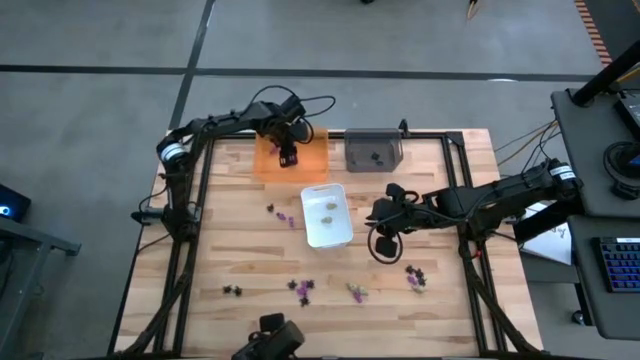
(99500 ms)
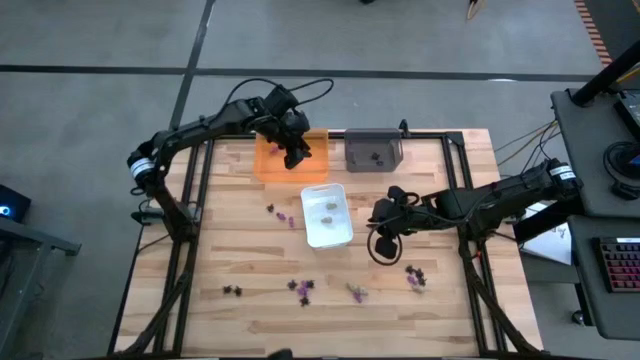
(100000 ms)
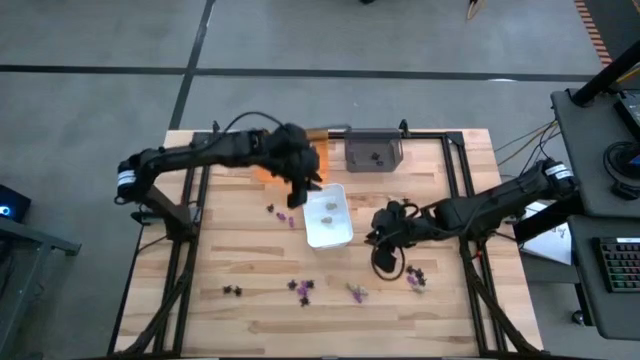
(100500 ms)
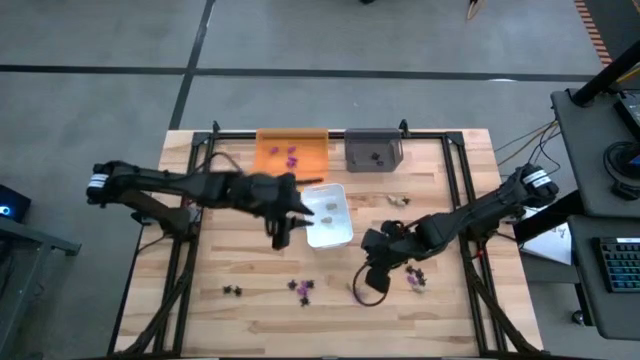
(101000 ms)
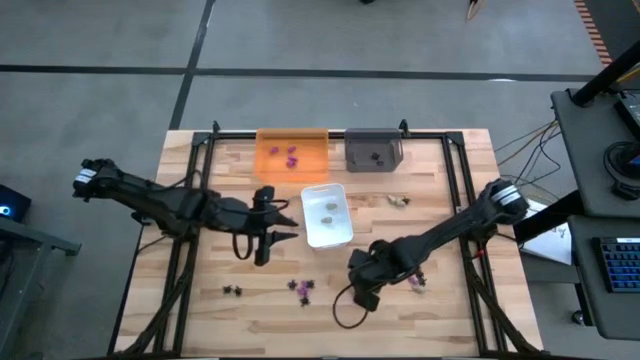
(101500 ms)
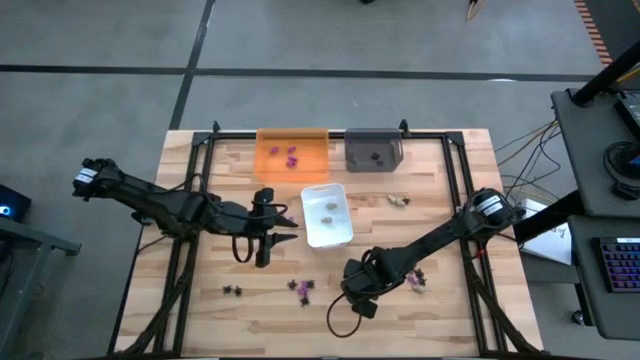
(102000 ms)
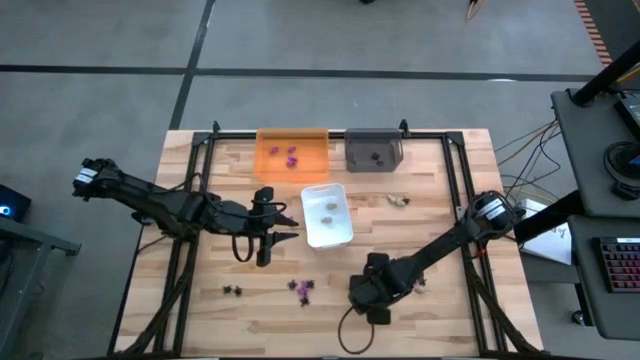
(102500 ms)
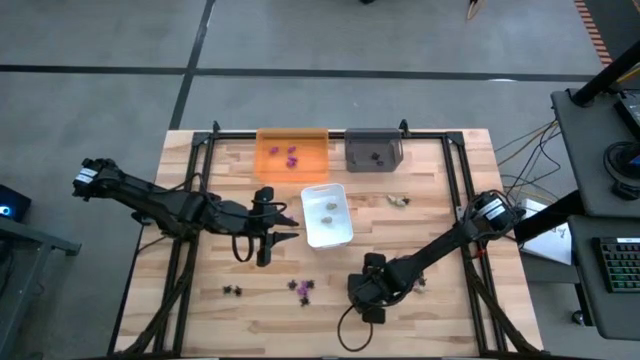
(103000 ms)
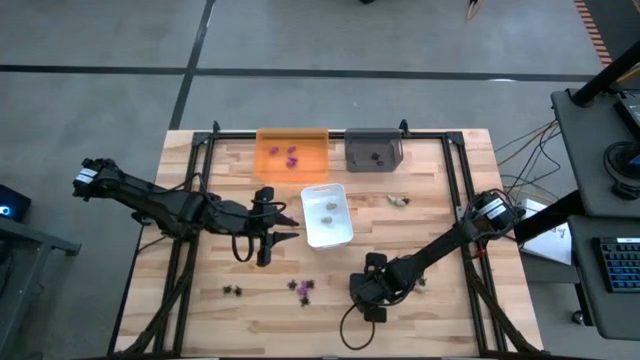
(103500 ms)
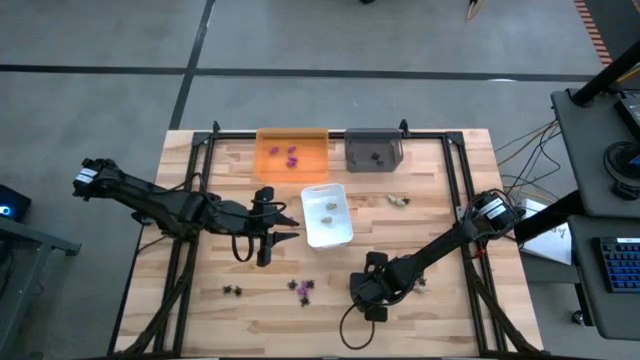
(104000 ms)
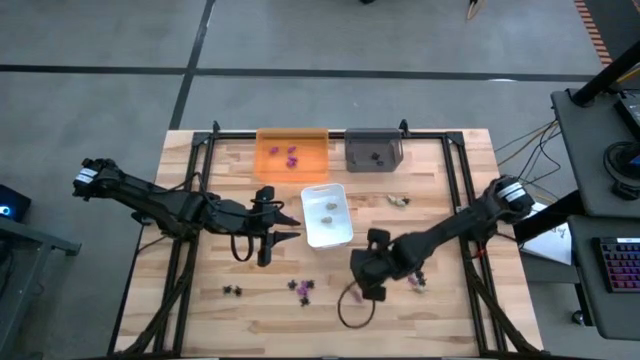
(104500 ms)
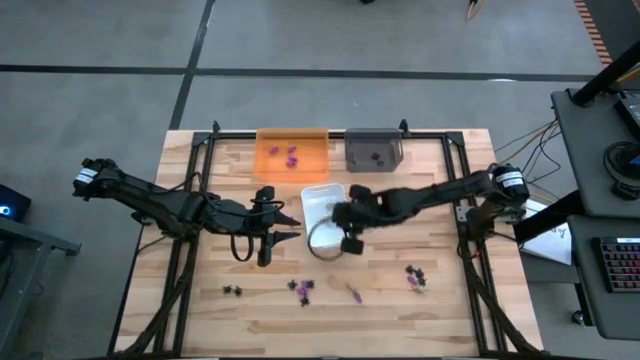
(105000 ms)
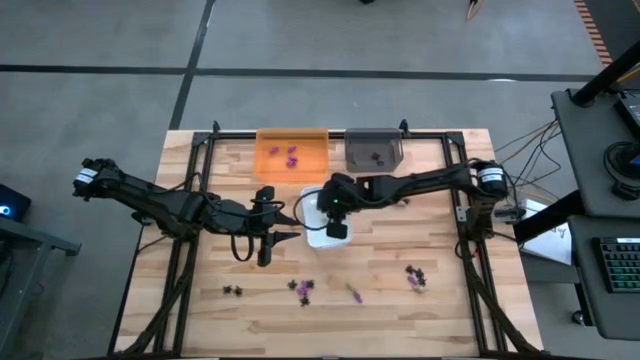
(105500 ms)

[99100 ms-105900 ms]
Task: Sort Halloween decoration
Put the white skull toy into the white bin

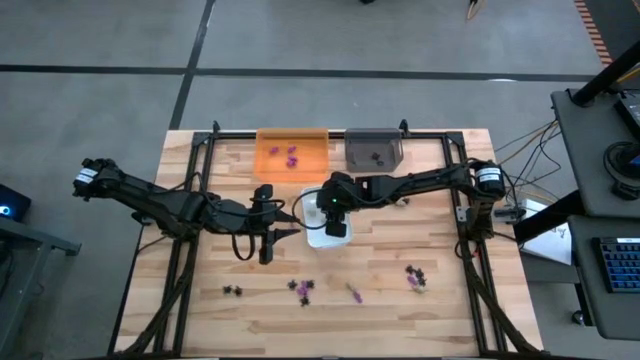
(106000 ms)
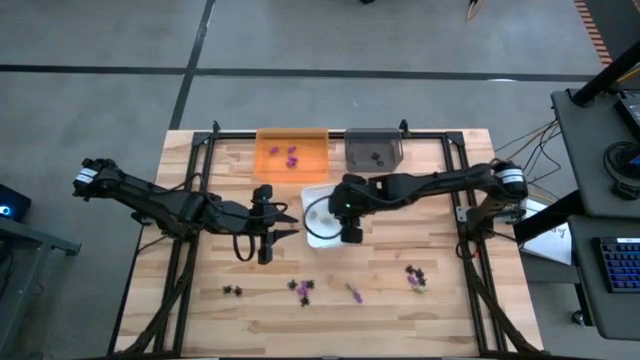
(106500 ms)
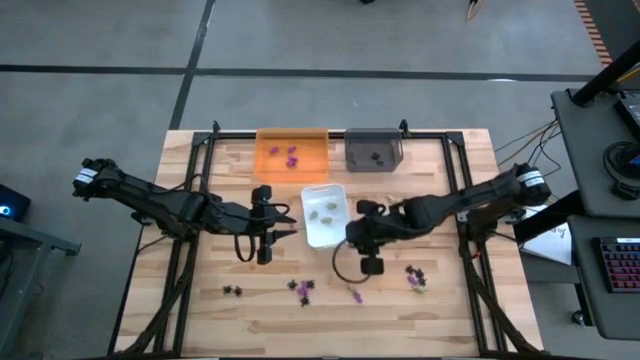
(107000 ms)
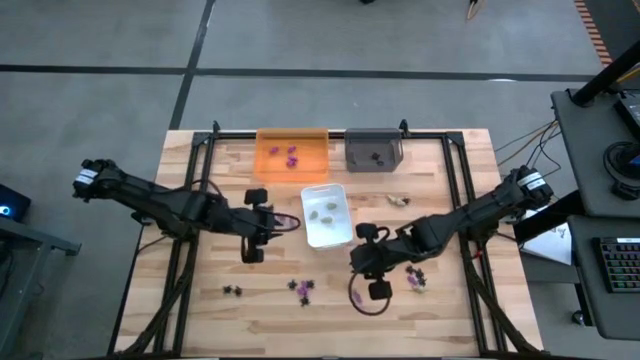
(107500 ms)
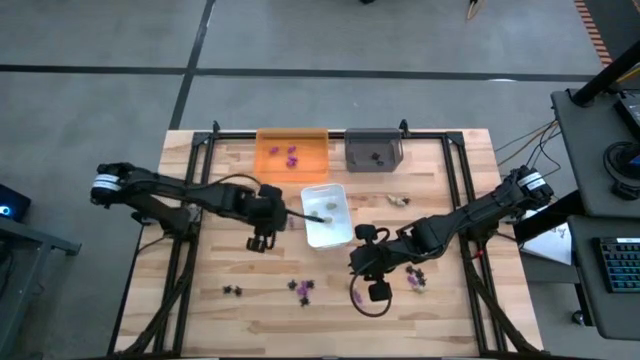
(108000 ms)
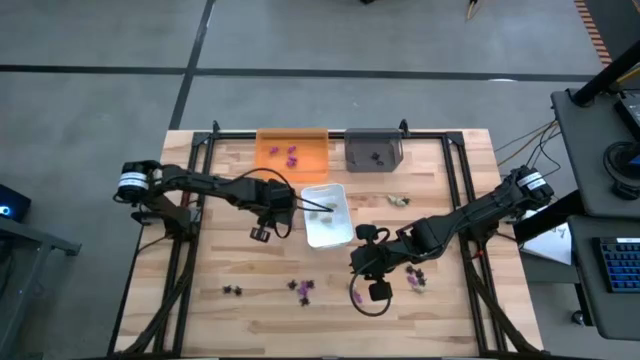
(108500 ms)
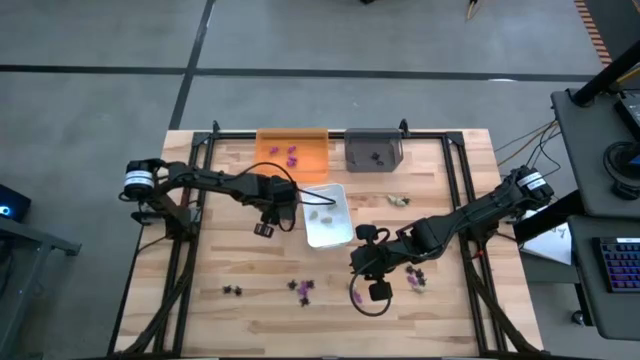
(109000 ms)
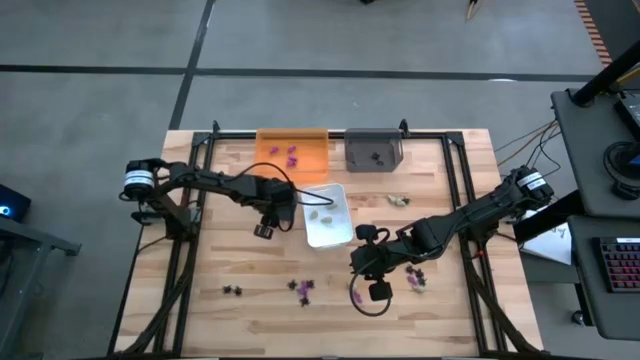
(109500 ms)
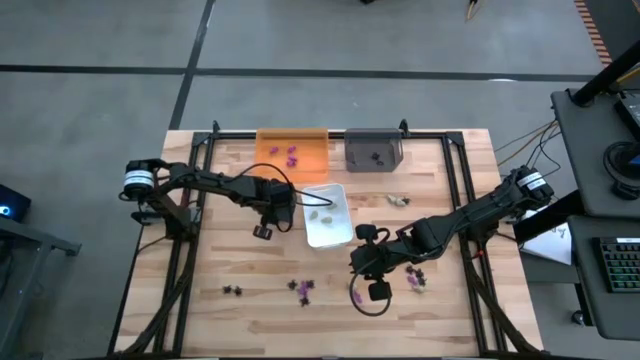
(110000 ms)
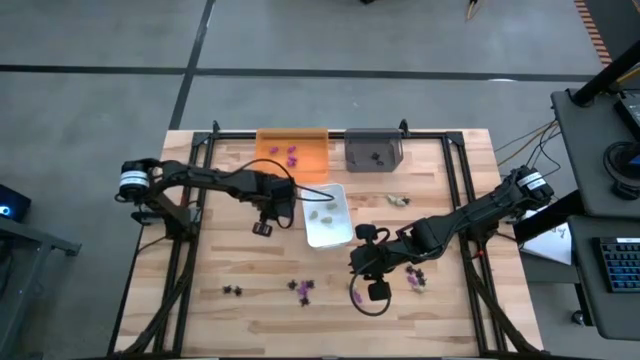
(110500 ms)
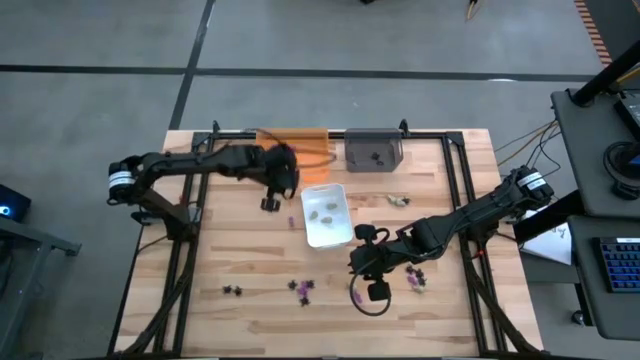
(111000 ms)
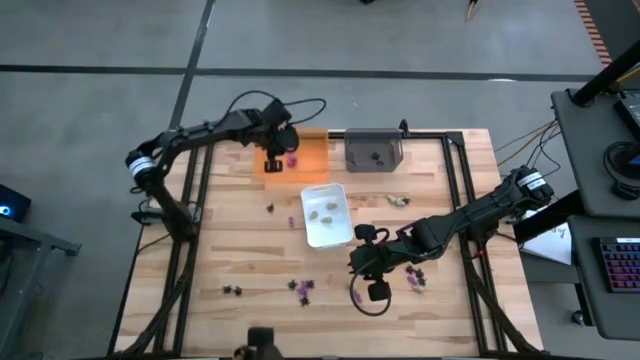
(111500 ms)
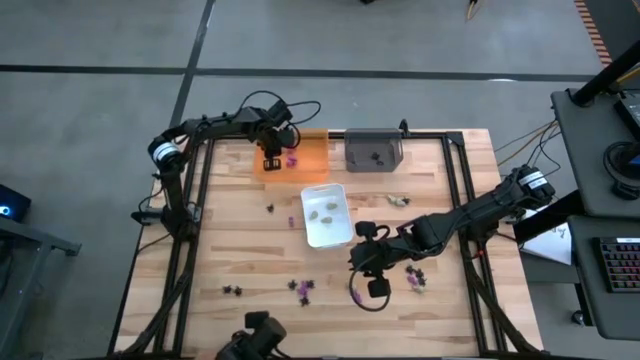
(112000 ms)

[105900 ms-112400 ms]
Put the purple skeleton toy into the orange bin

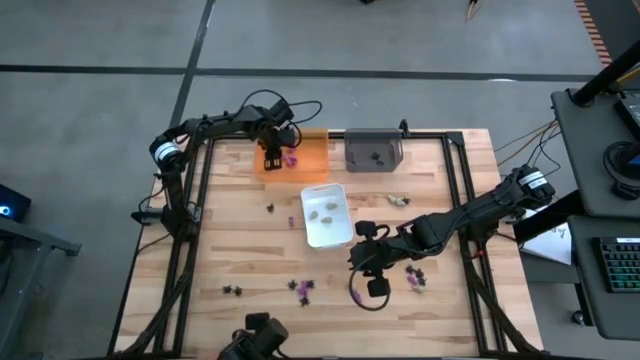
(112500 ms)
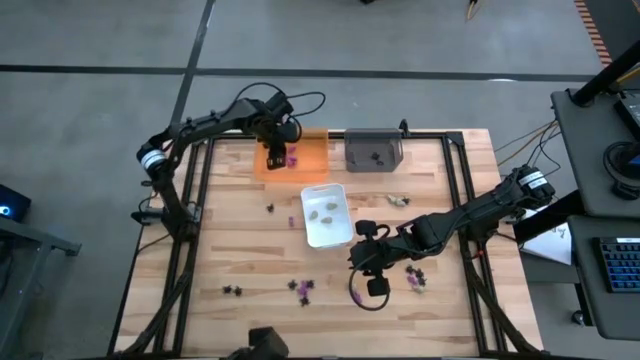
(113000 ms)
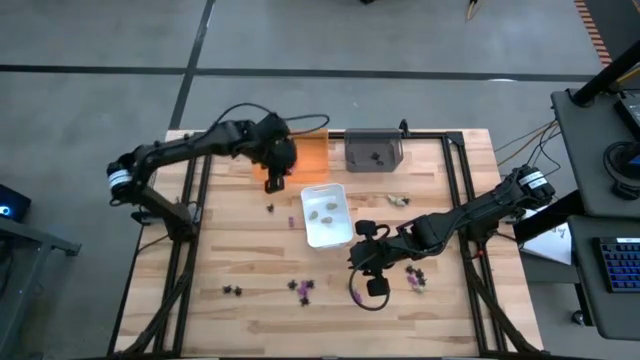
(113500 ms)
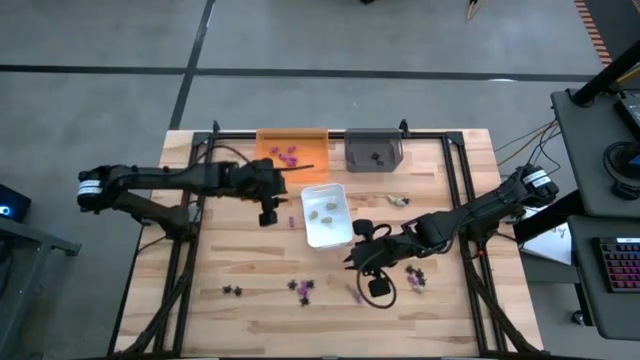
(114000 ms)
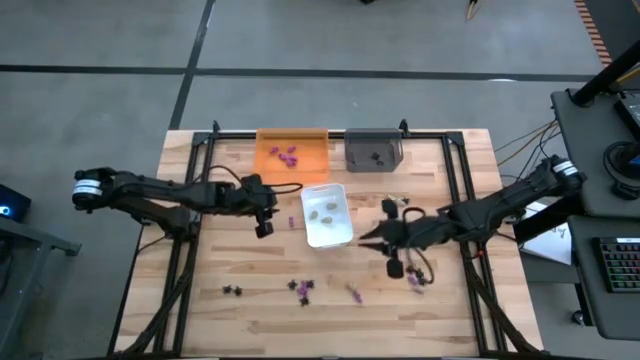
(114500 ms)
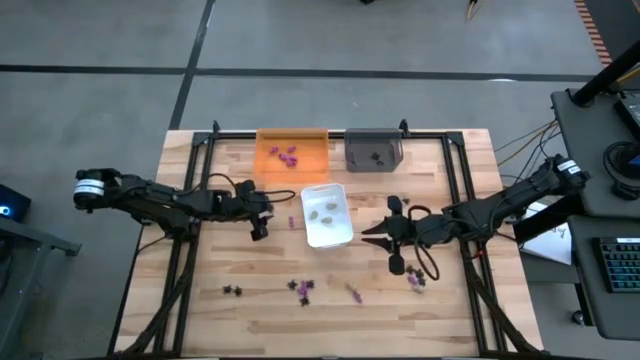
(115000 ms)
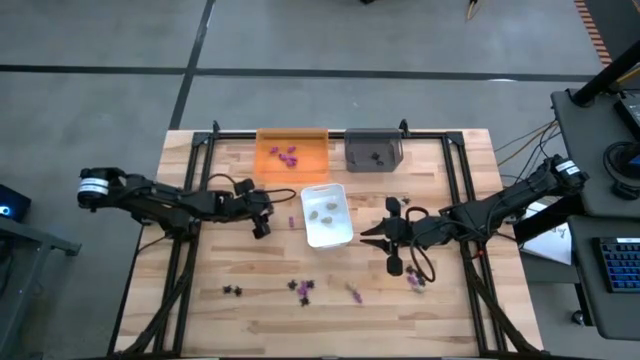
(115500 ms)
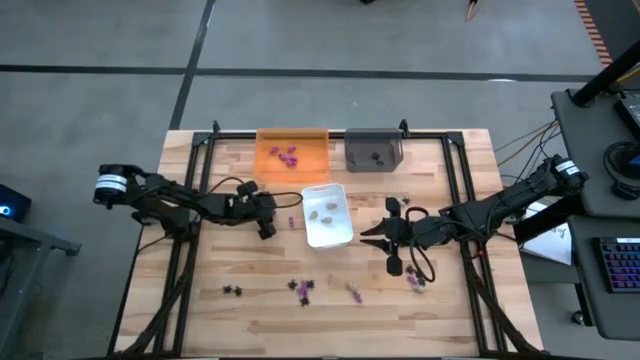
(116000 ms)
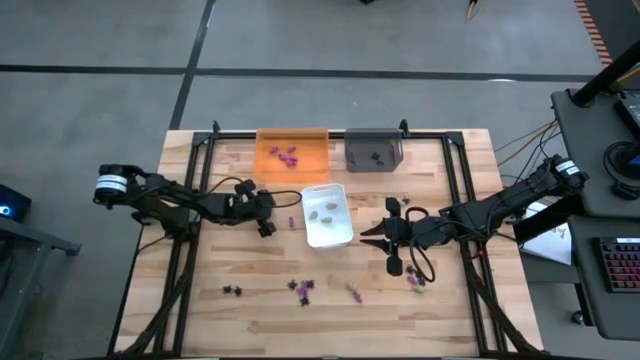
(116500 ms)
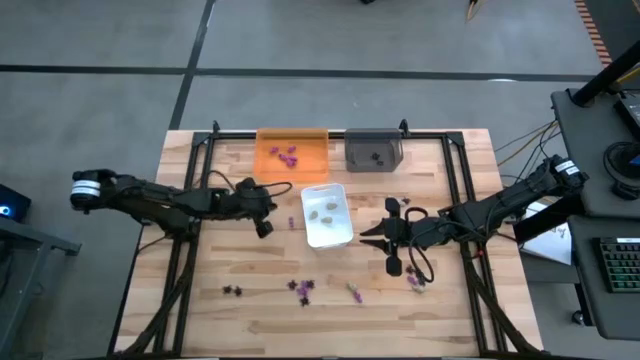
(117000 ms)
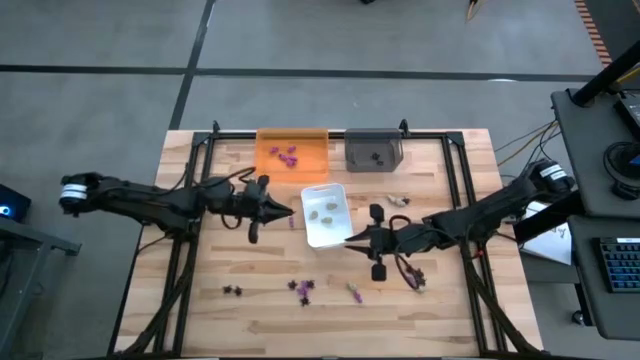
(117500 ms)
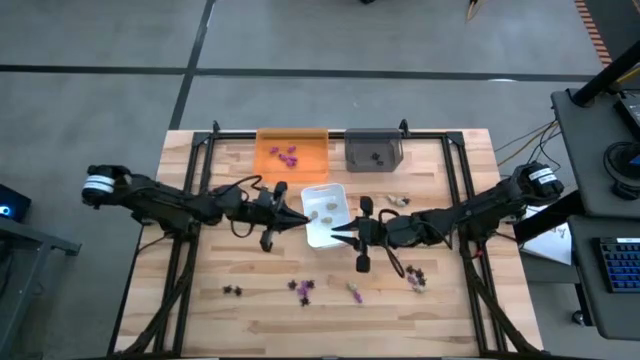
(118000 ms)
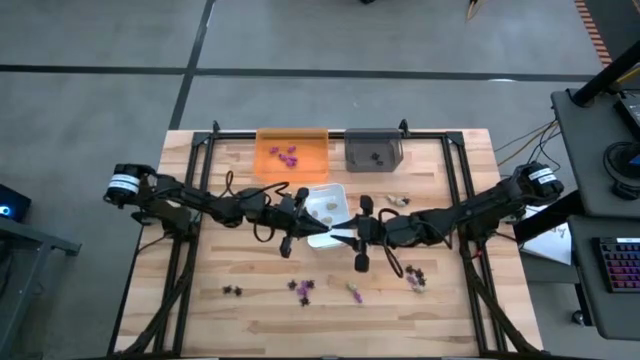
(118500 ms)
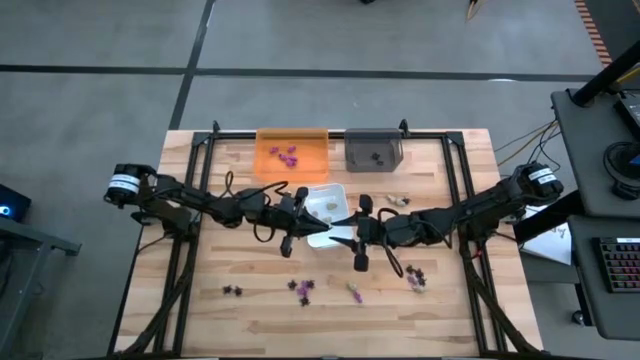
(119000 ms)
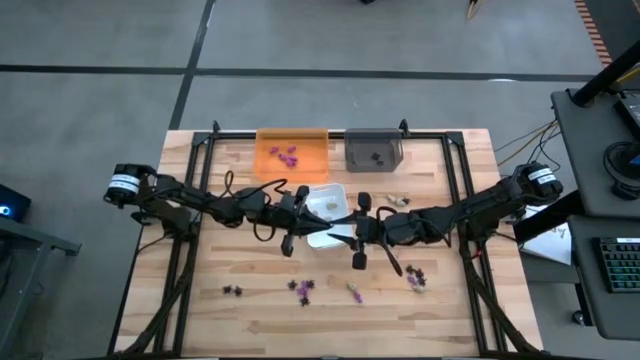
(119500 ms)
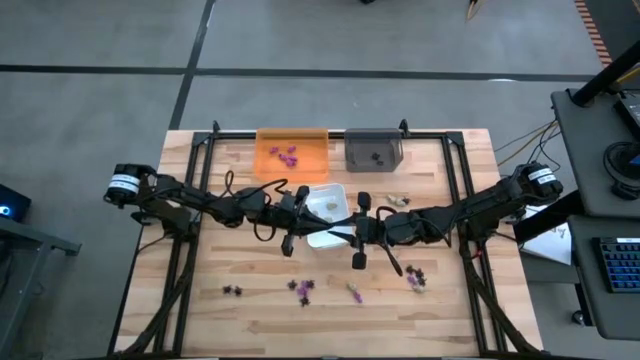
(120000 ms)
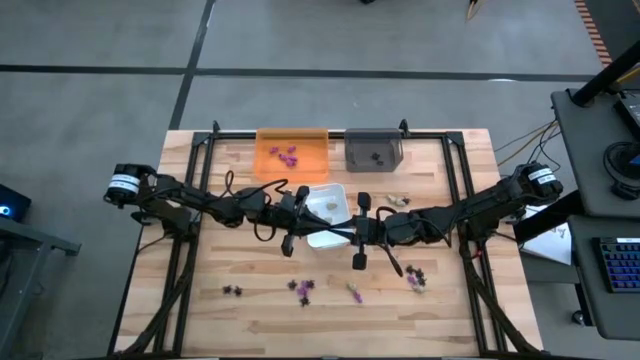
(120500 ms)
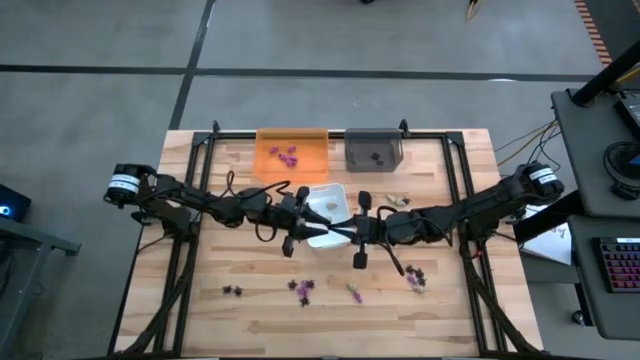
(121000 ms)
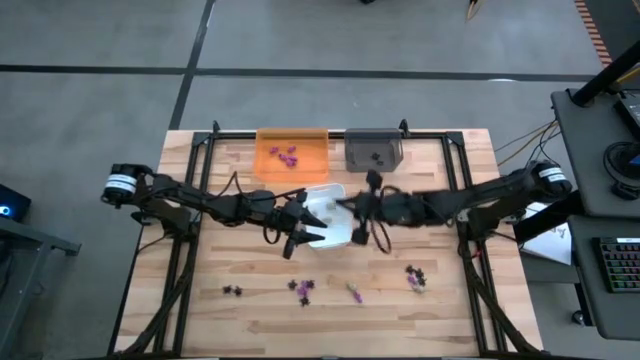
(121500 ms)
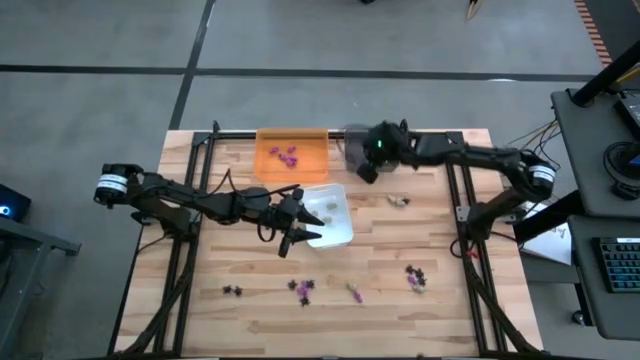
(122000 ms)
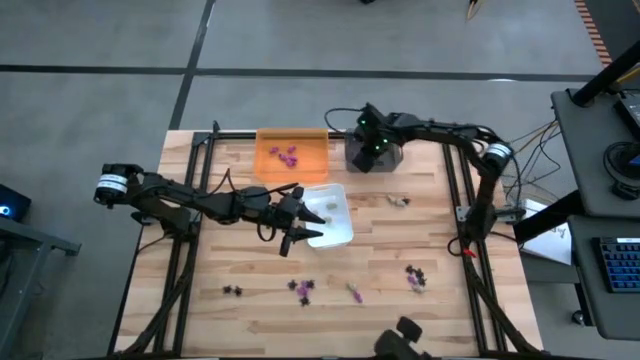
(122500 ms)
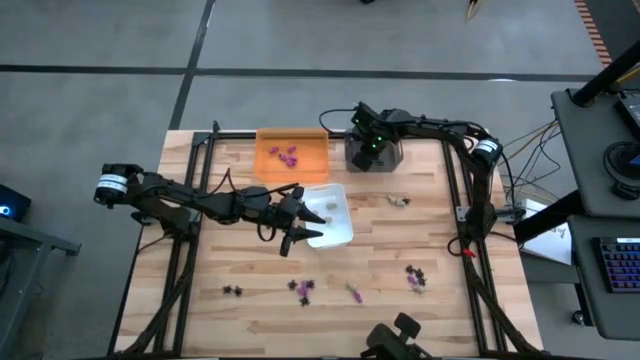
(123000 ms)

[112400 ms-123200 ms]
Put the black spider toy into the black bin
